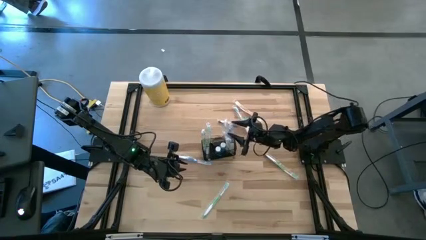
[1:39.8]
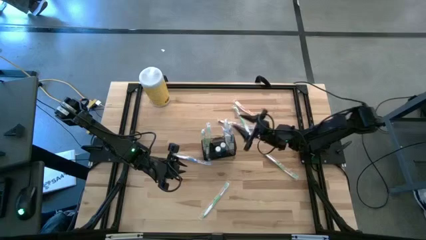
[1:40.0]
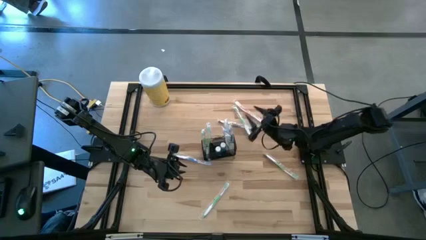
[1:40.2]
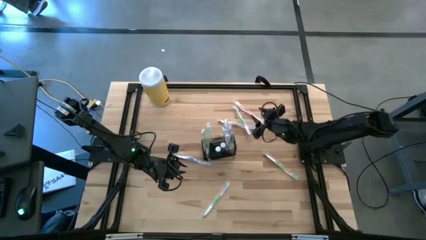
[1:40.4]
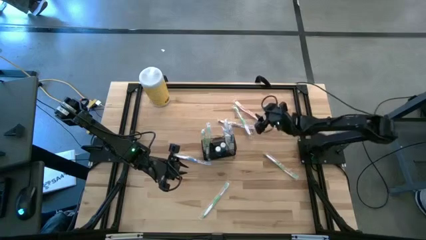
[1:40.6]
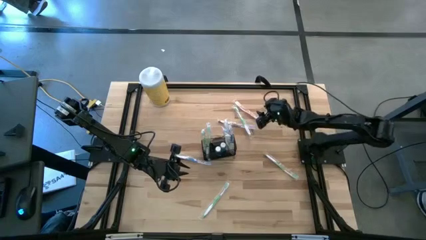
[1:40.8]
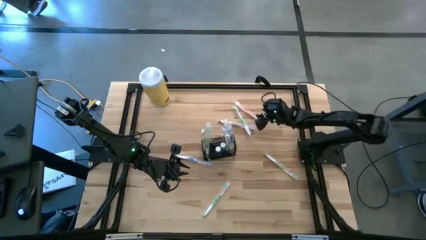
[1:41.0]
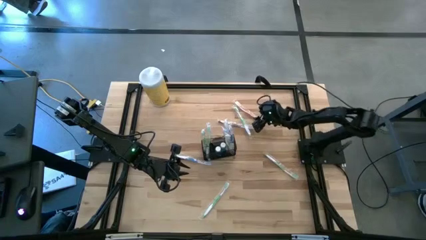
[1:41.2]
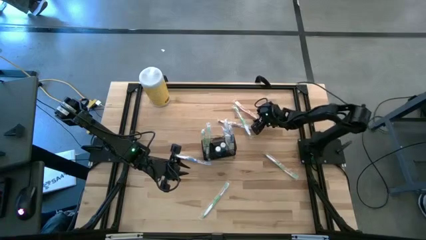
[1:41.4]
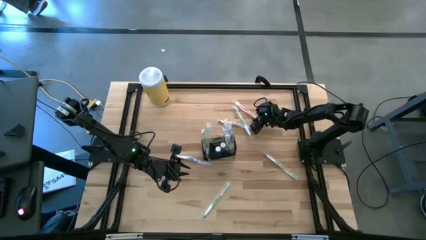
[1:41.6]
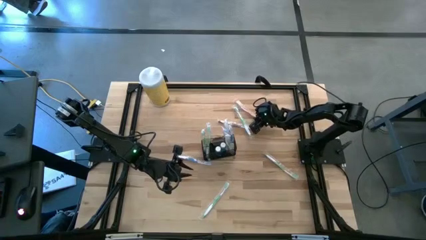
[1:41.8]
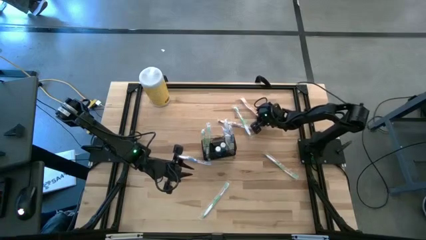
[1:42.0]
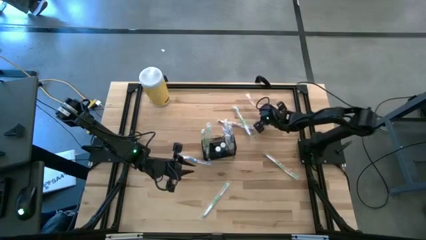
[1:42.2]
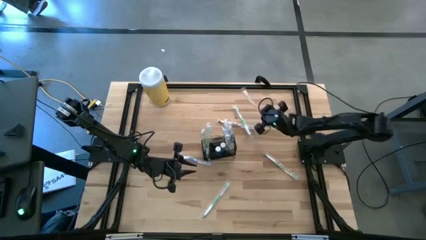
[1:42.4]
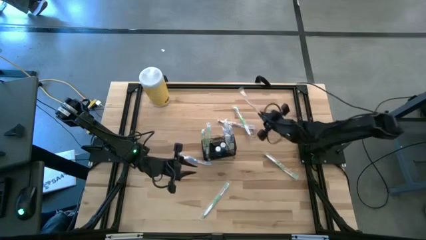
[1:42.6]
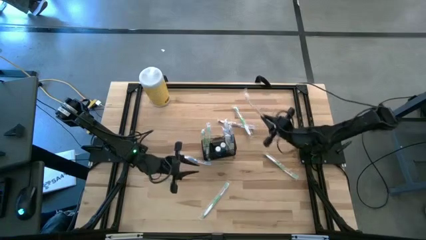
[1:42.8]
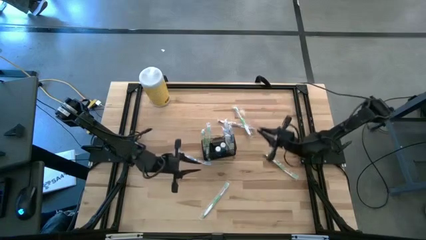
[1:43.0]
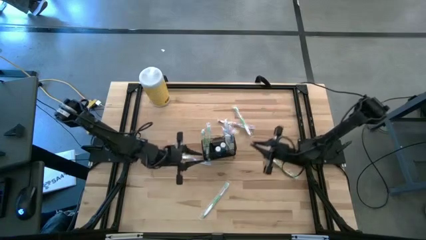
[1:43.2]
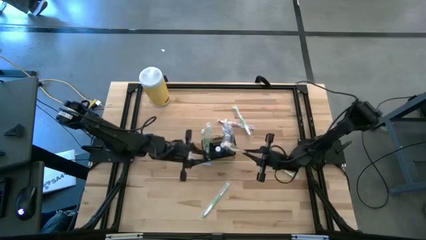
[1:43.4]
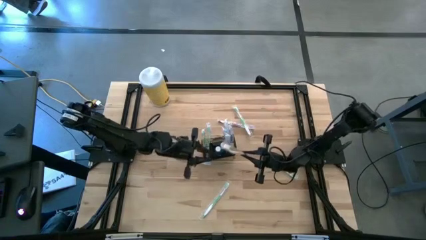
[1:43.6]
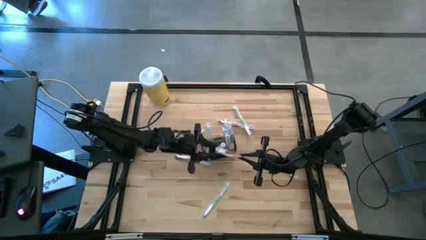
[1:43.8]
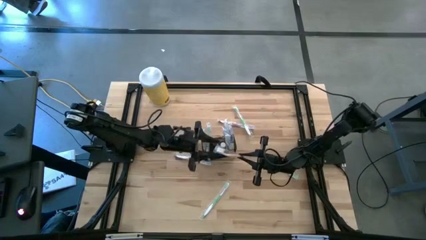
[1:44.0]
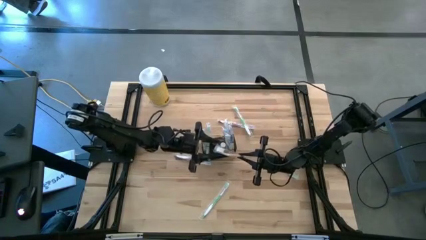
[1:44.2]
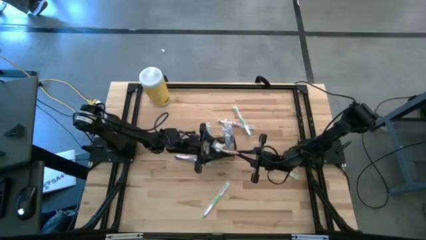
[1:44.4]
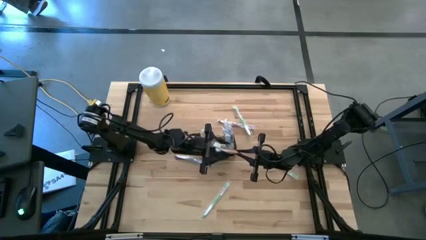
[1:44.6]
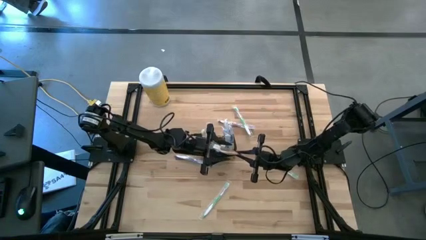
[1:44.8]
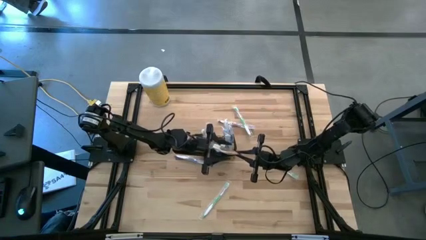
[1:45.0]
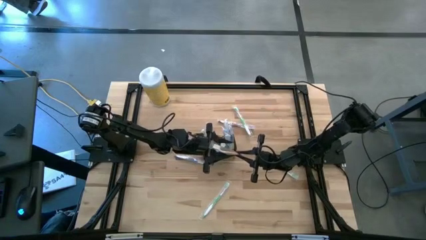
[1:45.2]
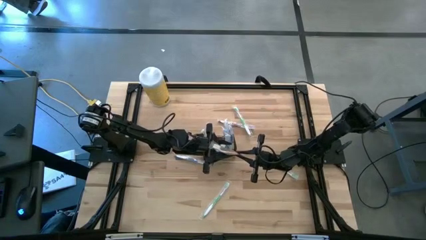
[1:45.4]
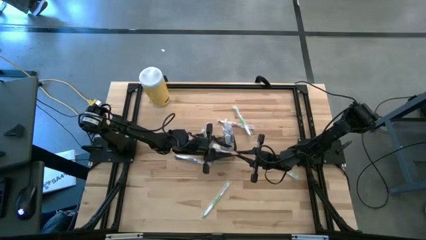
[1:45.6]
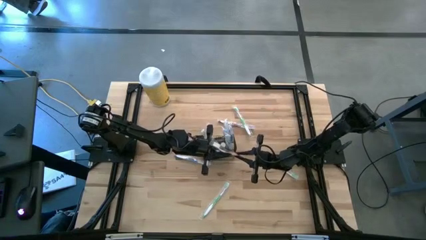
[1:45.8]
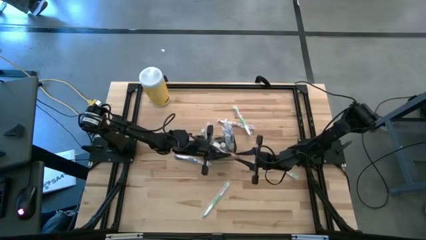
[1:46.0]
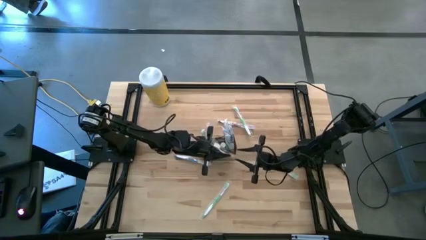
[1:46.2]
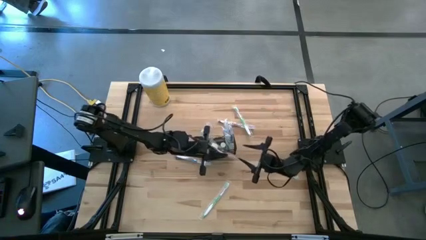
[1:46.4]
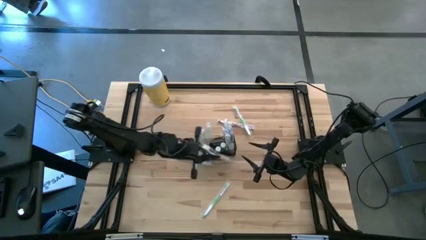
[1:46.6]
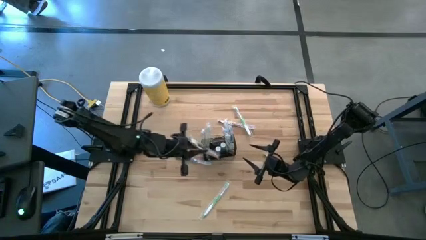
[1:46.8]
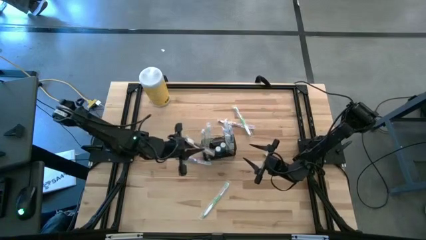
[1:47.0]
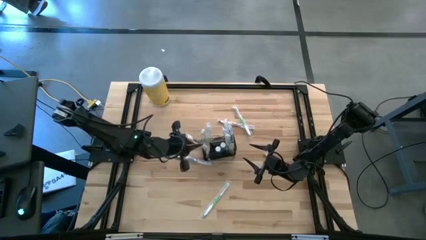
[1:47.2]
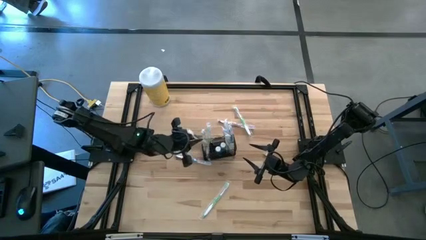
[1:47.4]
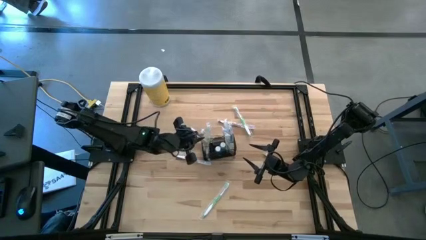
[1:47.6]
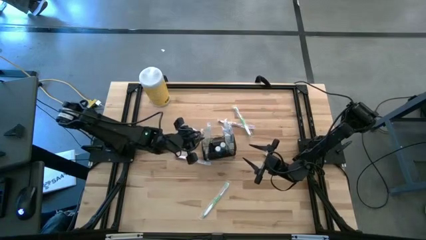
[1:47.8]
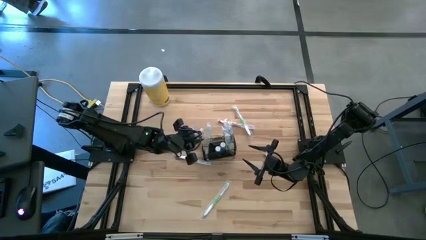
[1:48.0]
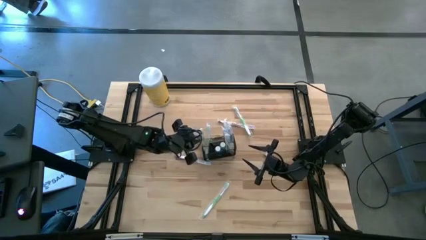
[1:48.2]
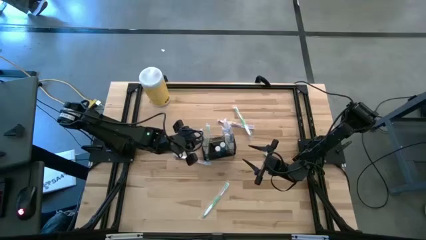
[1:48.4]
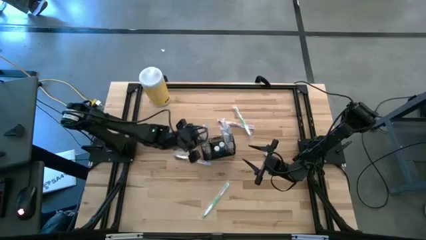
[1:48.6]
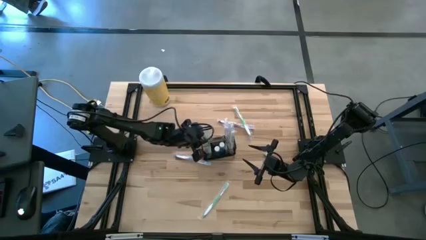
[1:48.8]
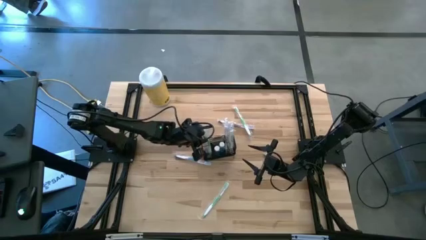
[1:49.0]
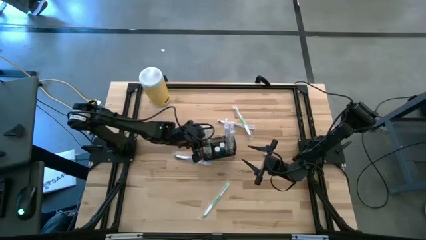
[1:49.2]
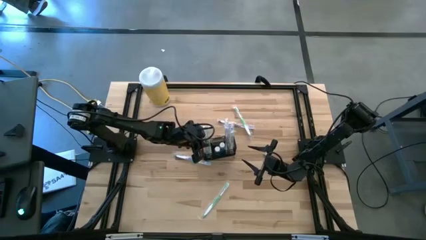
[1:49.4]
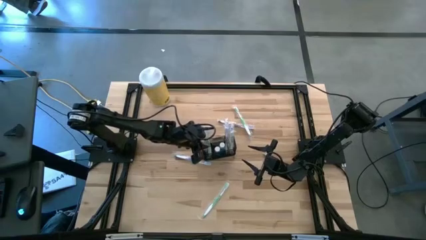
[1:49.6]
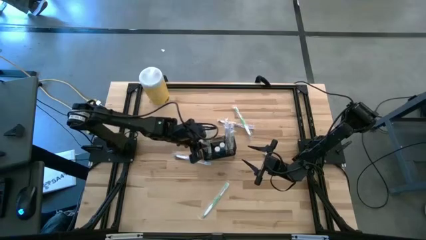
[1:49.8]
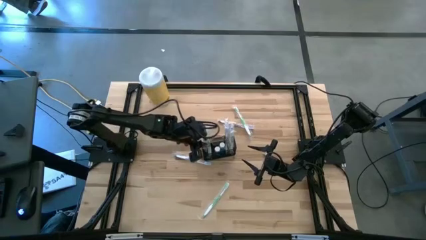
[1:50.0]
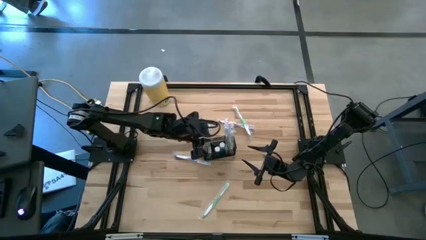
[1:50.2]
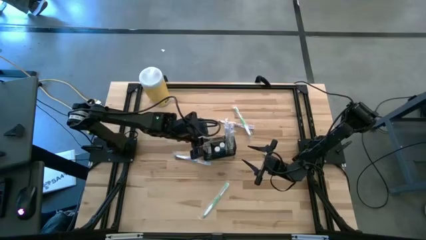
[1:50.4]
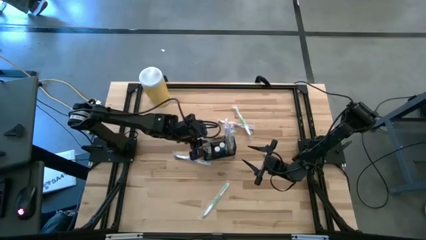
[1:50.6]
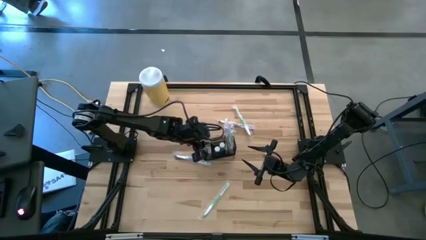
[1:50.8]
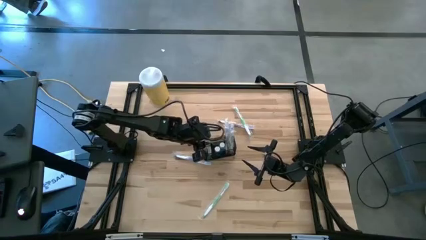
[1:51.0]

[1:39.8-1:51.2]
Task: Pick & Place toothbrushing station
Put the orange toothbrush into the wire organizer

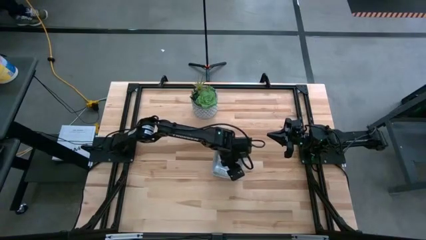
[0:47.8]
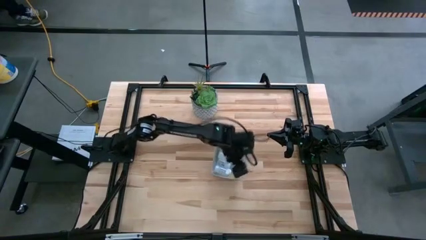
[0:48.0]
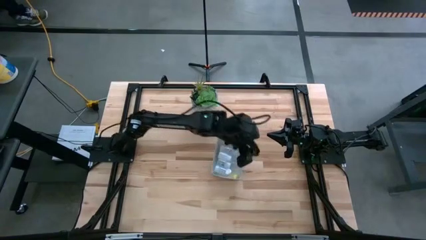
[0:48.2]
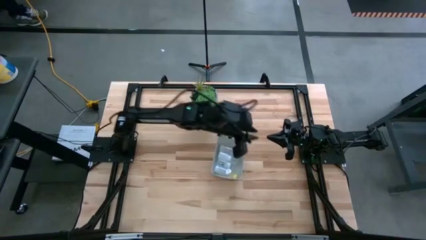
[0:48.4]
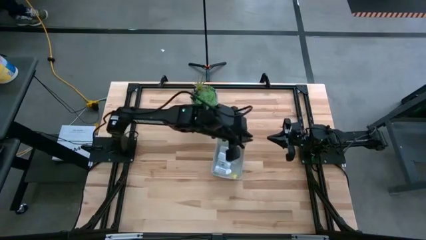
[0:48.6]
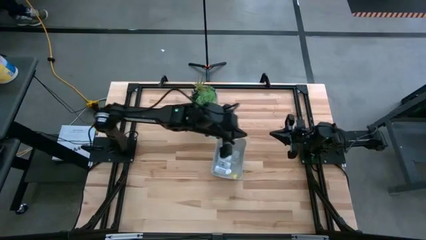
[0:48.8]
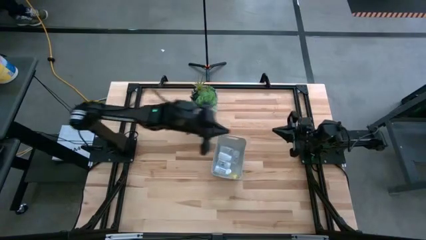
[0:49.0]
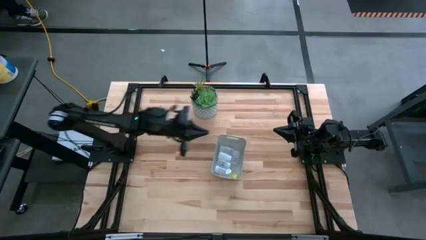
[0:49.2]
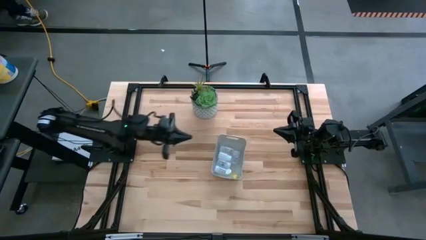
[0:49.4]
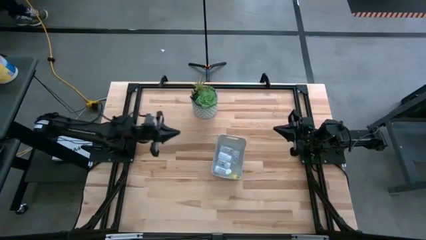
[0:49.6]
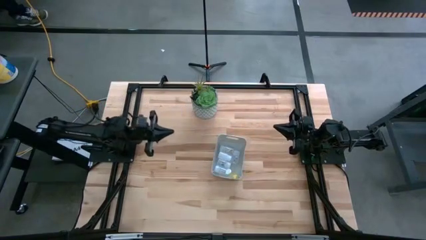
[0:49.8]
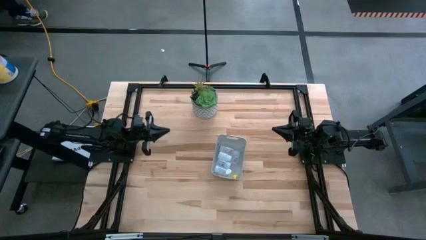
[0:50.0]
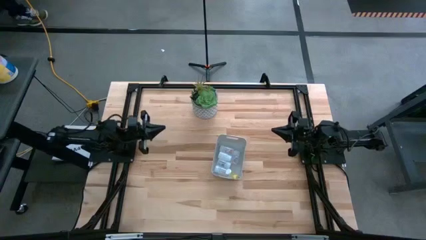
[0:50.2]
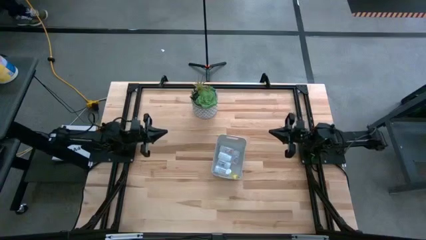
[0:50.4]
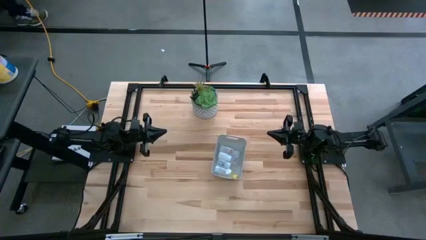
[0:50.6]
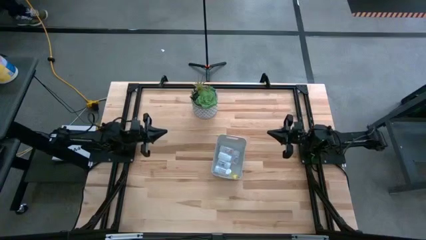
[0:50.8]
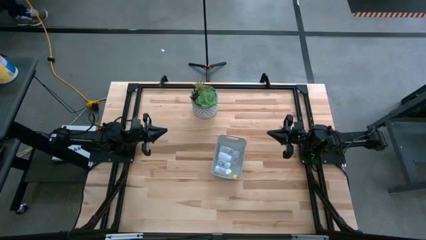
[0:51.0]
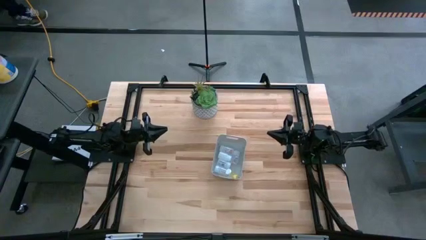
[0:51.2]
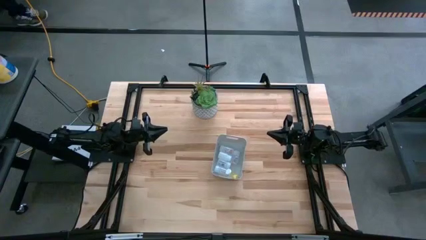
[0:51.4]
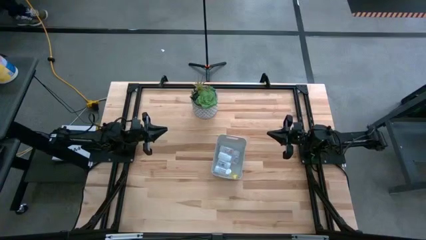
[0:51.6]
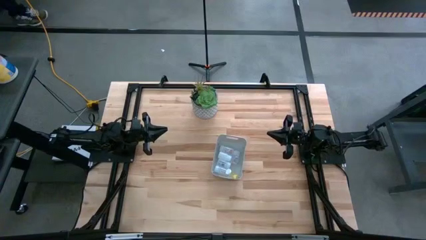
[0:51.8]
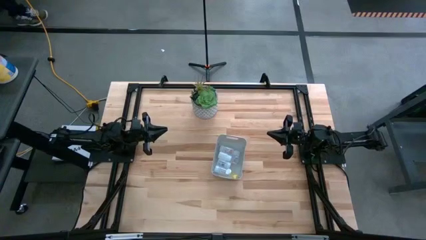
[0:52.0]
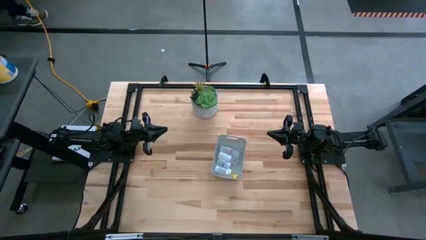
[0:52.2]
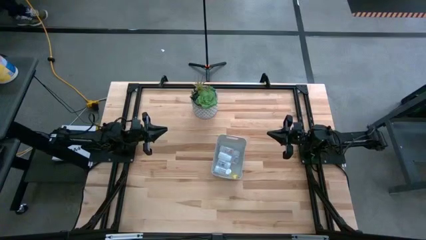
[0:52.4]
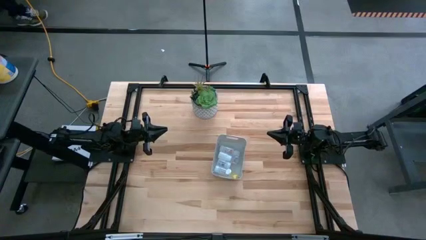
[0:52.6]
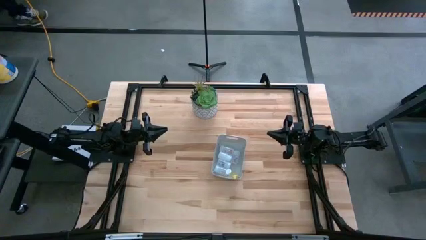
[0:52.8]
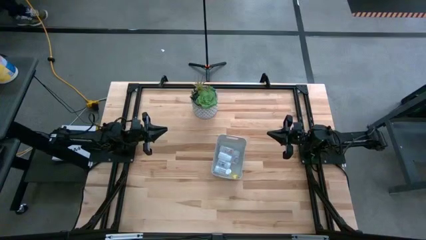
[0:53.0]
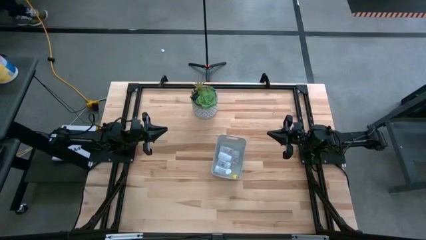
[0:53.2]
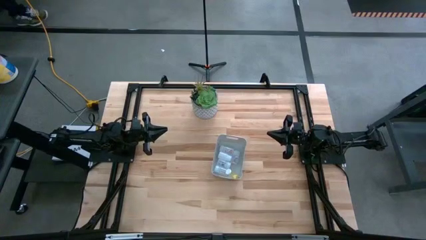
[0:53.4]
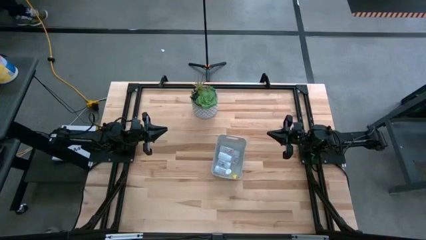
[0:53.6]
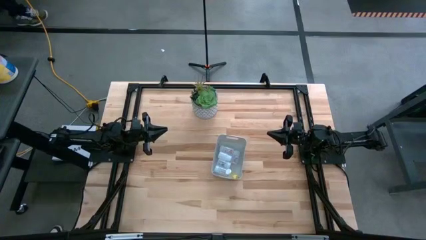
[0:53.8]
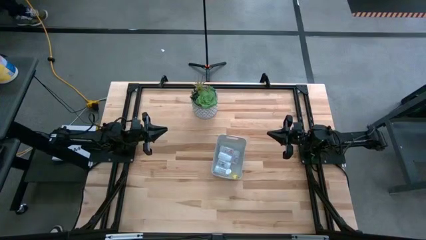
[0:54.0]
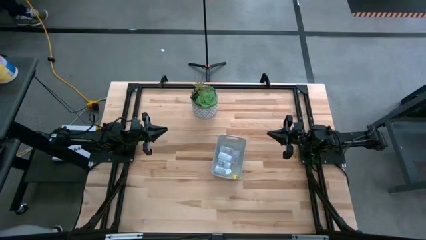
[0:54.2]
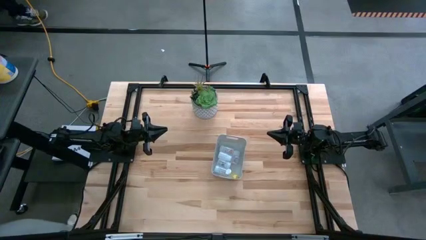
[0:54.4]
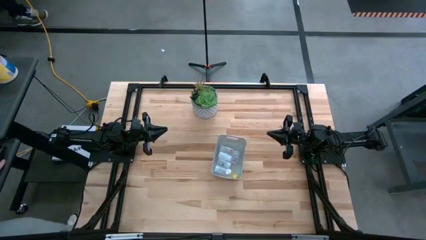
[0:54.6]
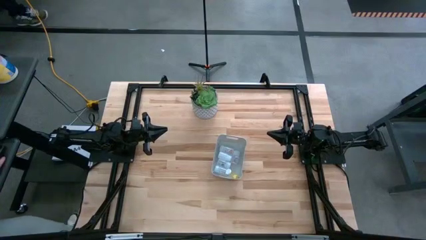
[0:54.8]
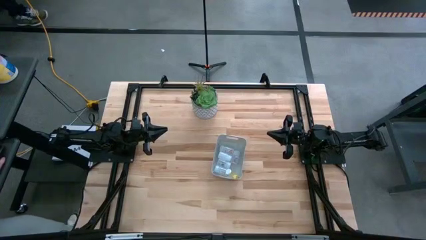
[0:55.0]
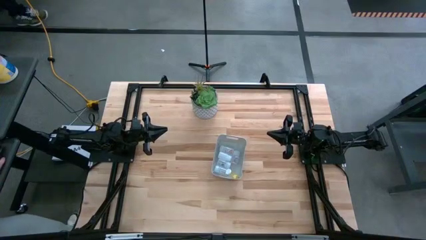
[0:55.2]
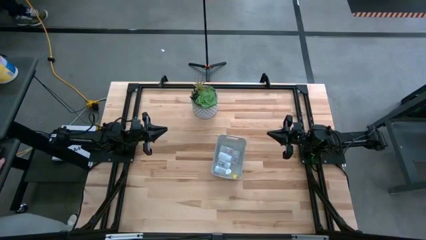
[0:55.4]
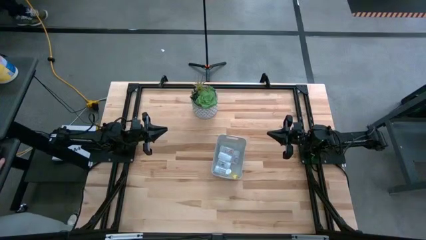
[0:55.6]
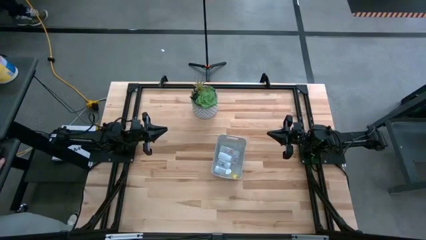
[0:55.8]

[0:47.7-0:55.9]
Task: Pick and place pill bottles into a basket
Return to Home Position
